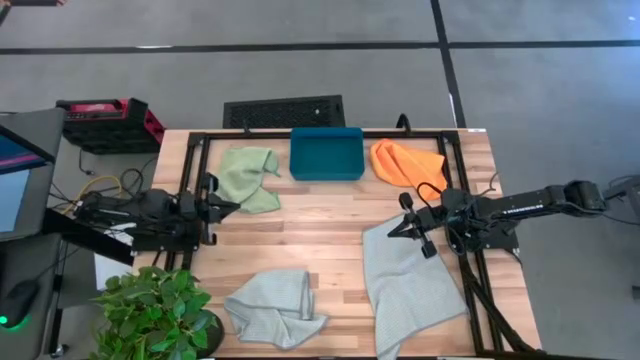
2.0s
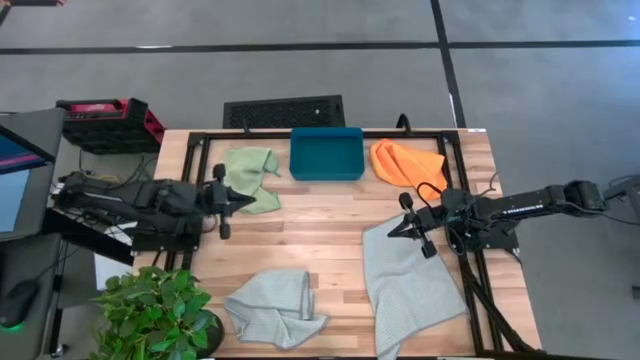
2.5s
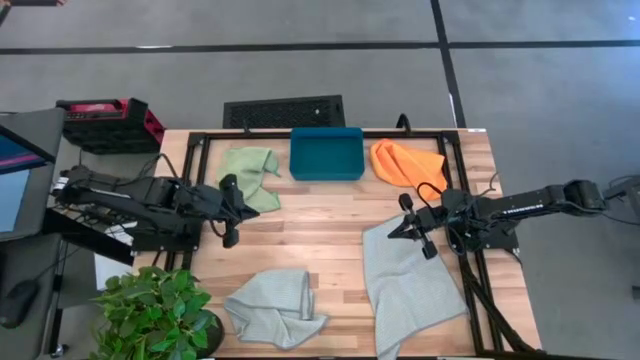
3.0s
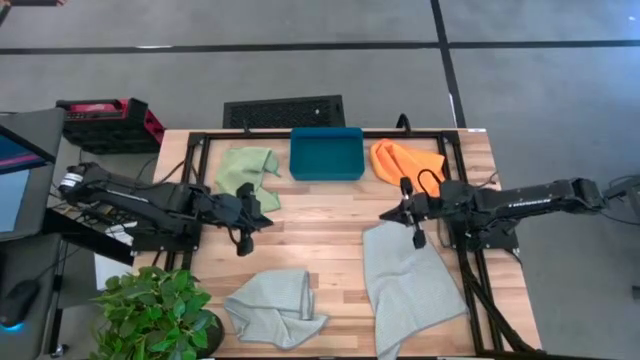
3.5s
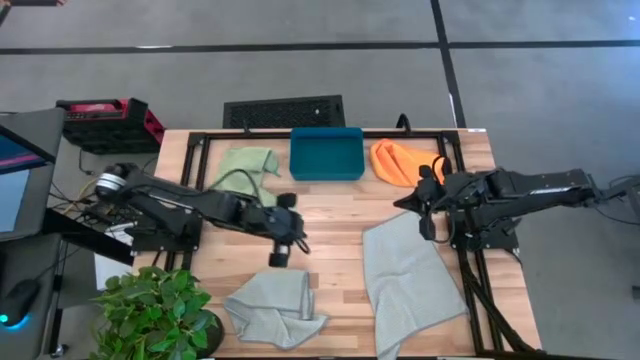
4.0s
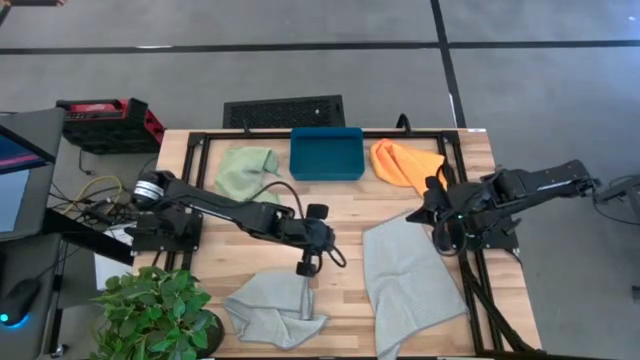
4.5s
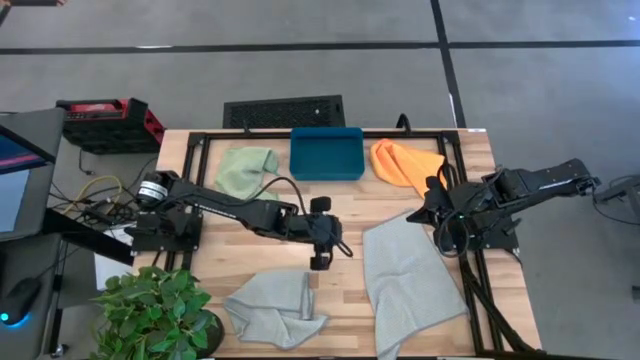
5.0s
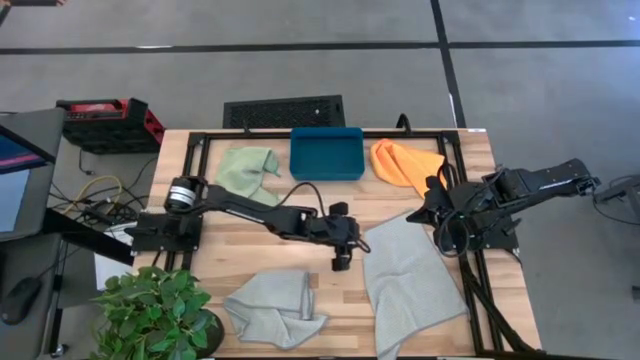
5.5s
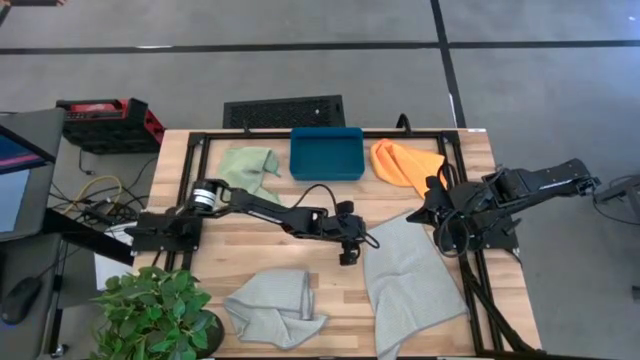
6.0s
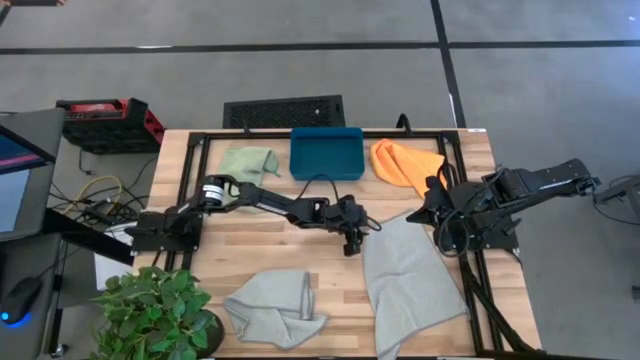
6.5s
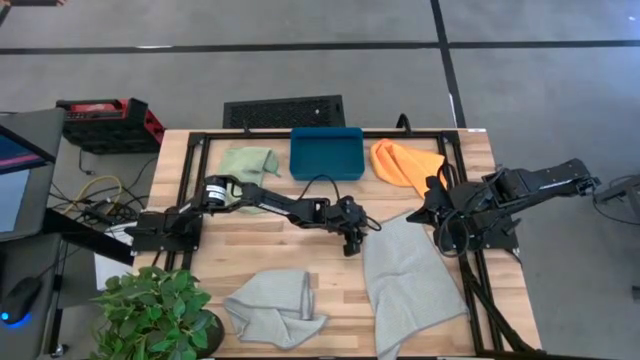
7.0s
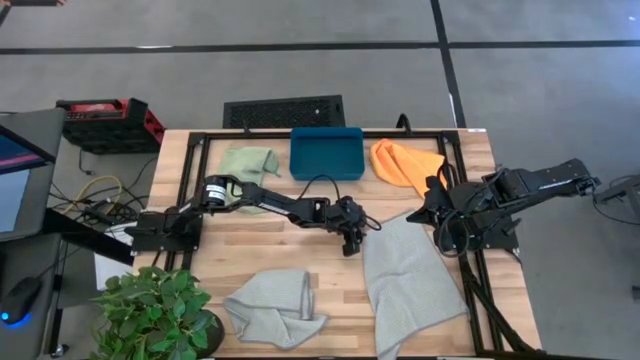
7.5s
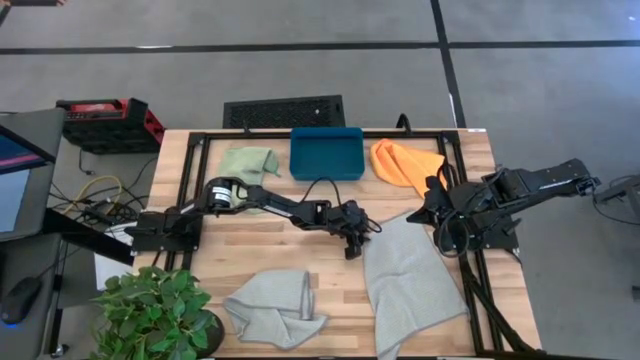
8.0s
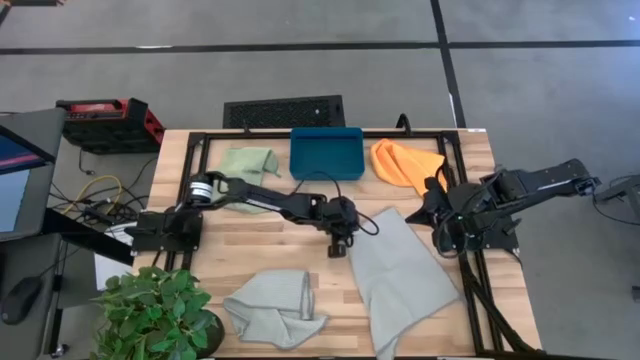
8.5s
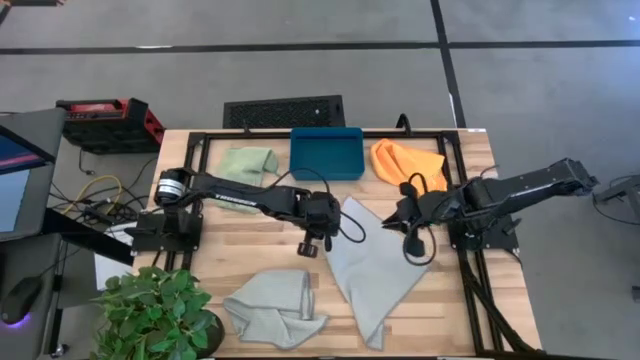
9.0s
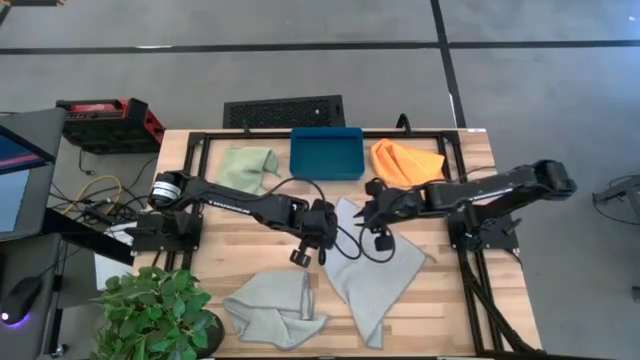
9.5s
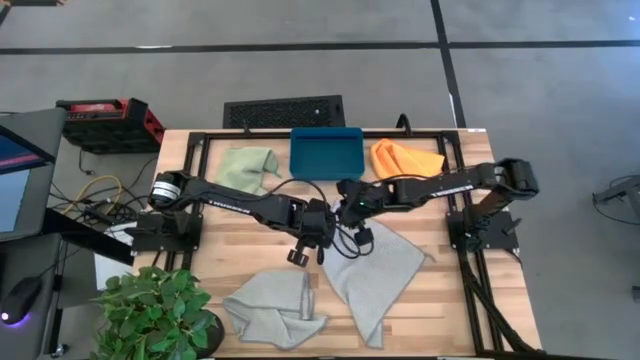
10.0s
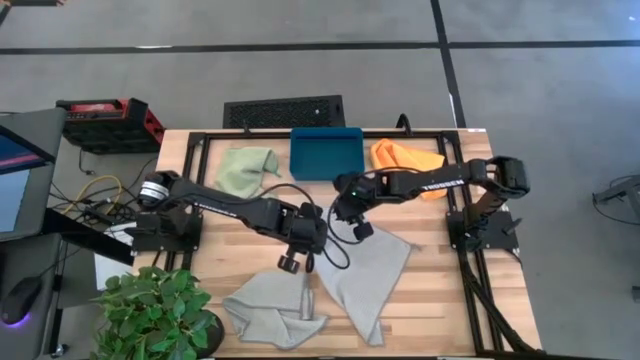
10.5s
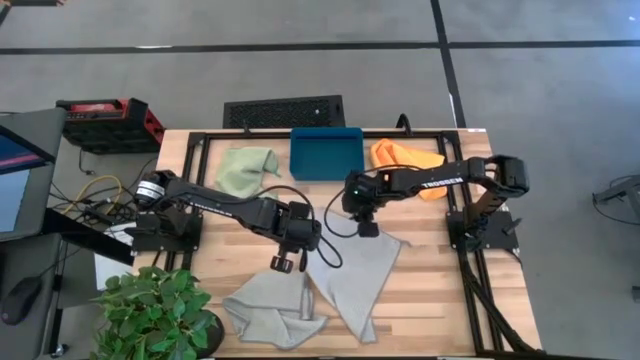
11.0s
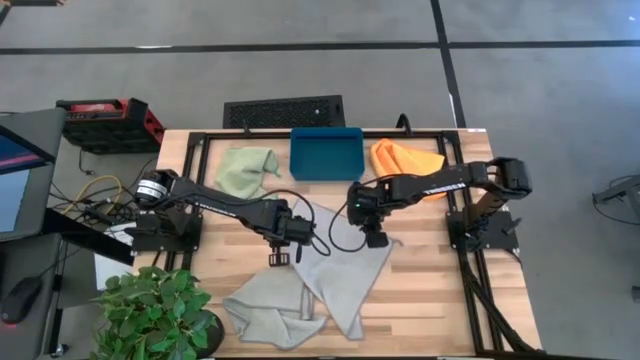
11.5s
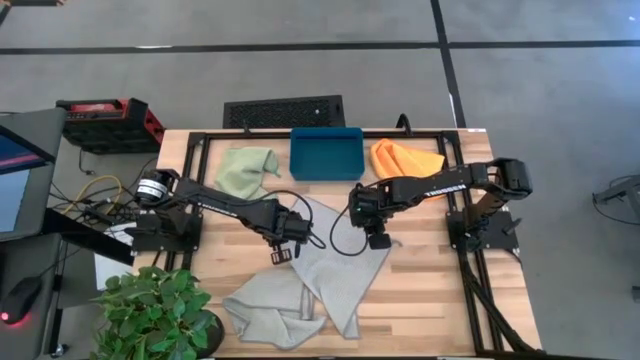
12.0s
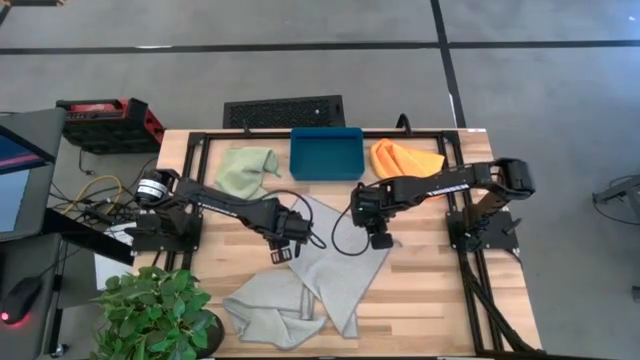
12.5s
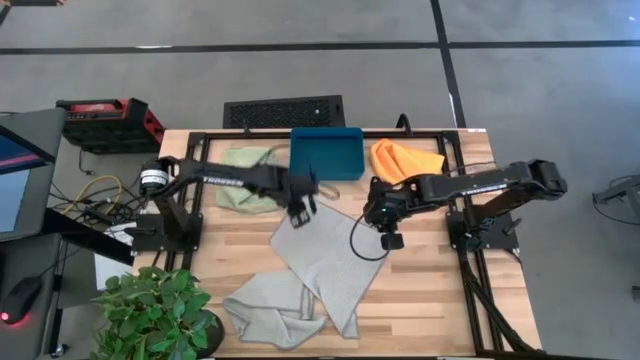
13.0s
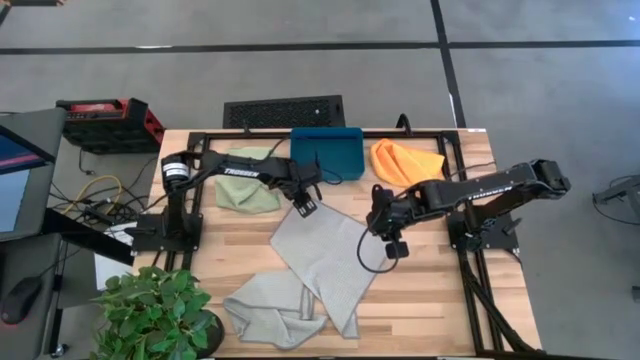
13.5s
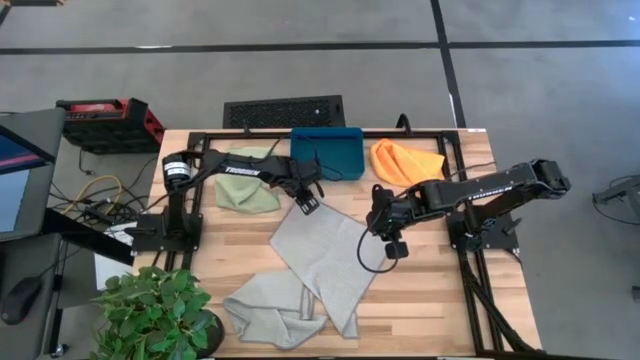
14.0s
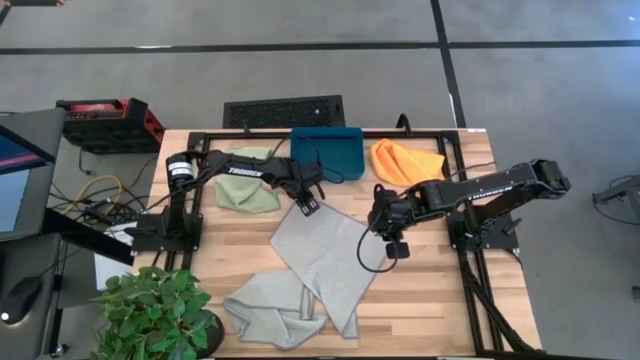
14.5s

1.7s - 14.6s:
Task: Fold microfiber towels
Fold the right gray towel
